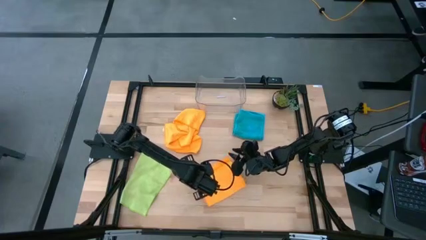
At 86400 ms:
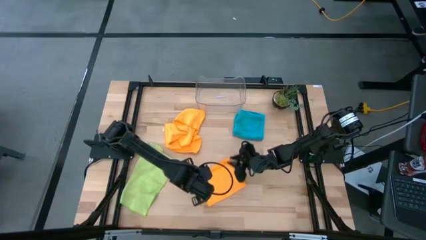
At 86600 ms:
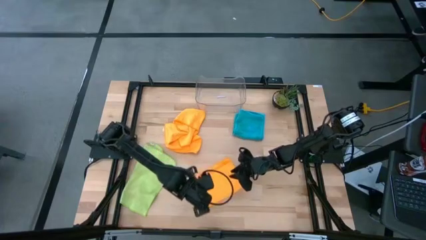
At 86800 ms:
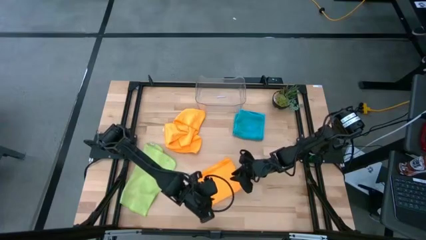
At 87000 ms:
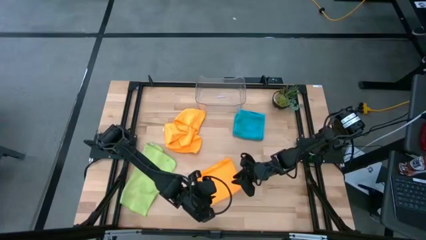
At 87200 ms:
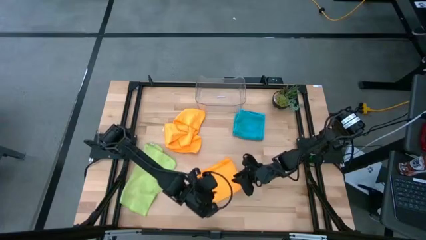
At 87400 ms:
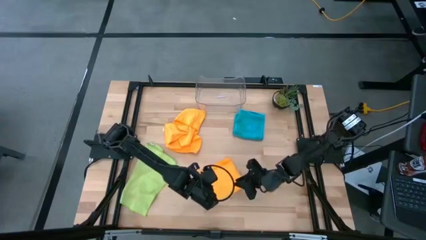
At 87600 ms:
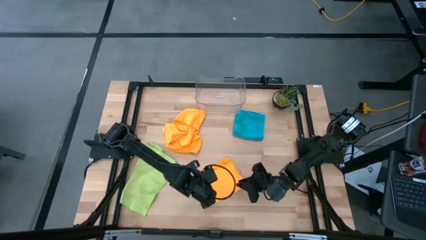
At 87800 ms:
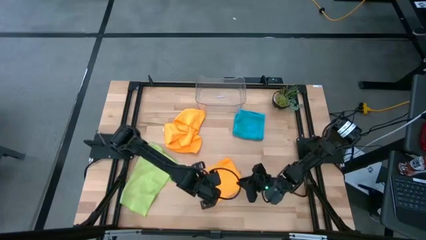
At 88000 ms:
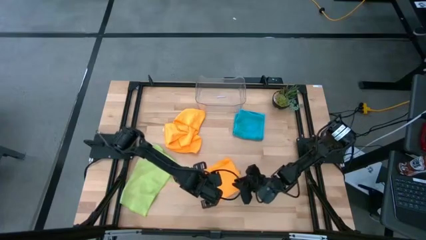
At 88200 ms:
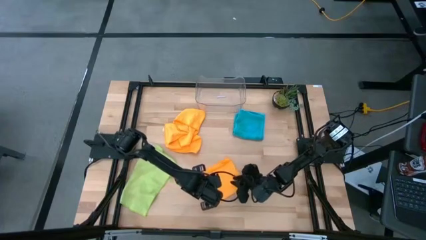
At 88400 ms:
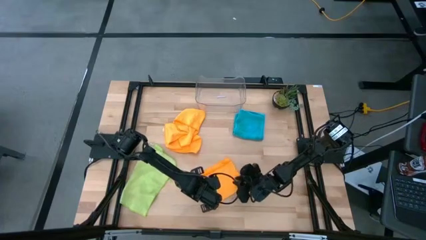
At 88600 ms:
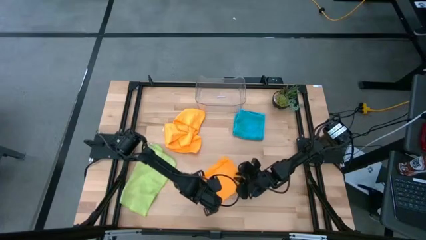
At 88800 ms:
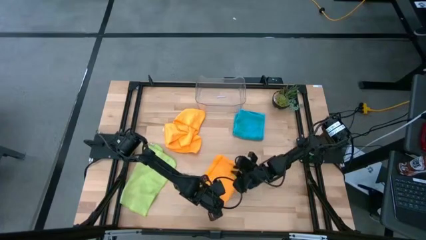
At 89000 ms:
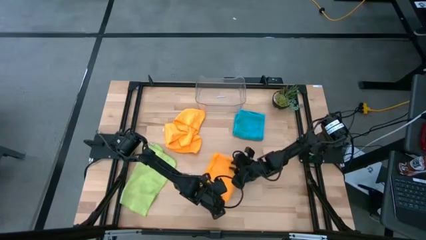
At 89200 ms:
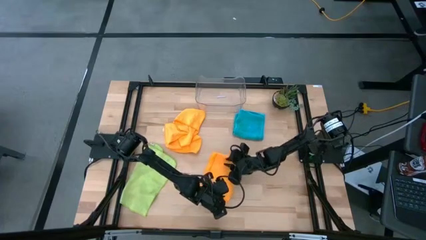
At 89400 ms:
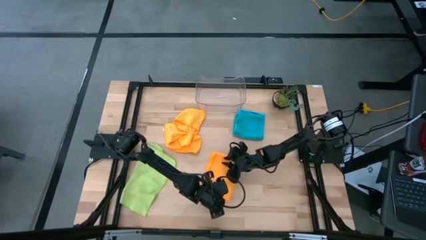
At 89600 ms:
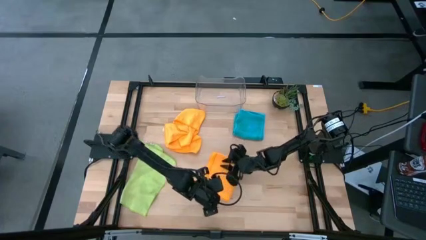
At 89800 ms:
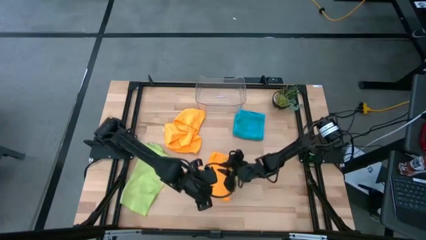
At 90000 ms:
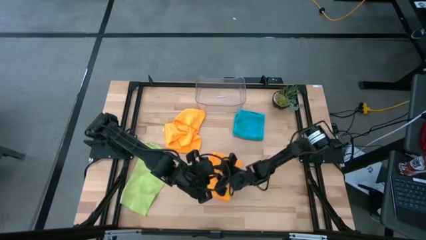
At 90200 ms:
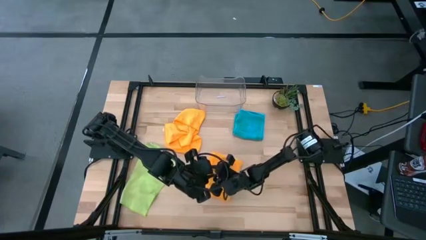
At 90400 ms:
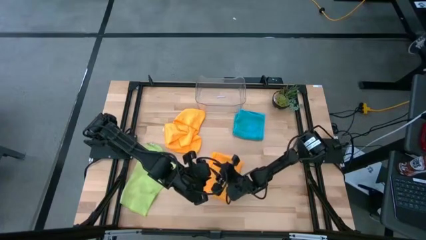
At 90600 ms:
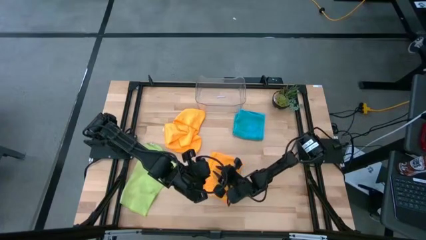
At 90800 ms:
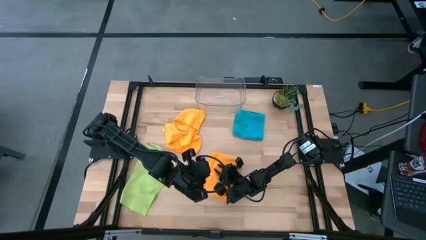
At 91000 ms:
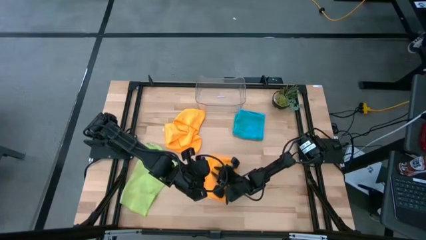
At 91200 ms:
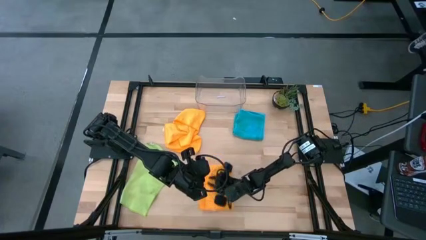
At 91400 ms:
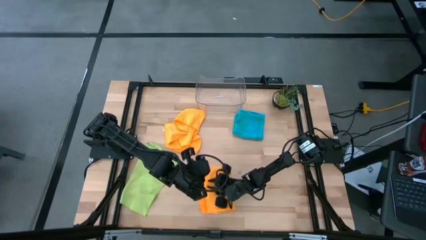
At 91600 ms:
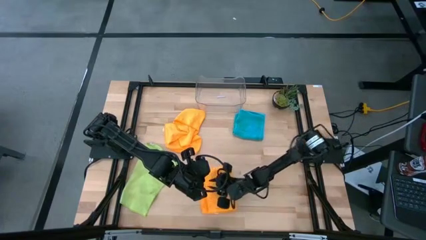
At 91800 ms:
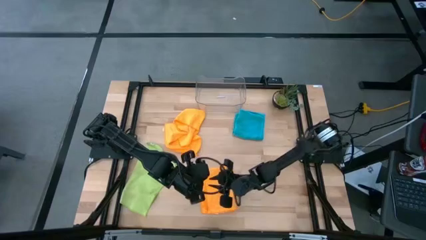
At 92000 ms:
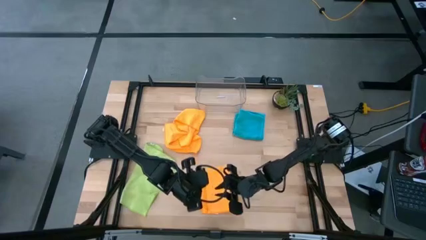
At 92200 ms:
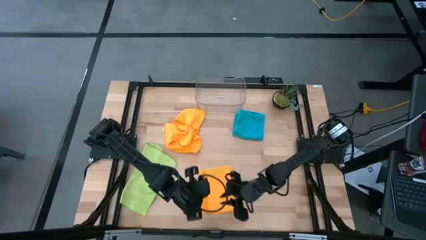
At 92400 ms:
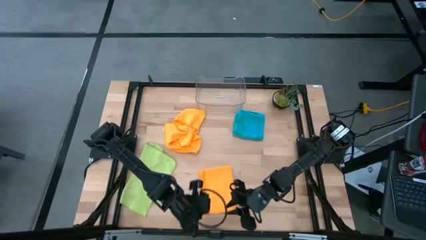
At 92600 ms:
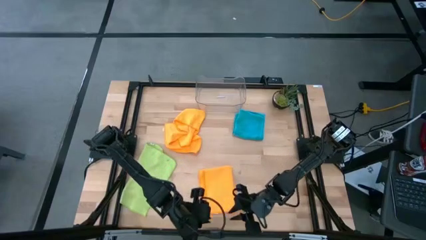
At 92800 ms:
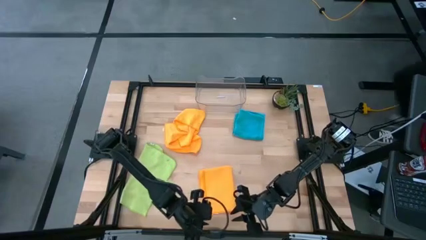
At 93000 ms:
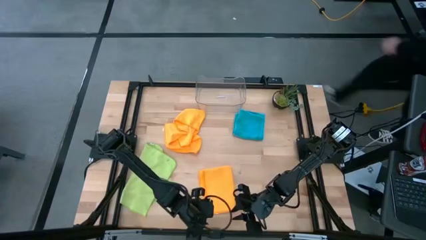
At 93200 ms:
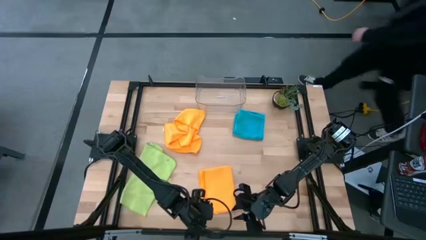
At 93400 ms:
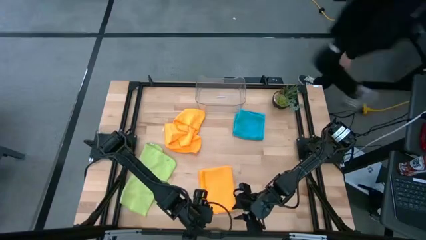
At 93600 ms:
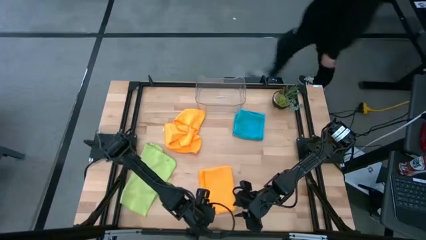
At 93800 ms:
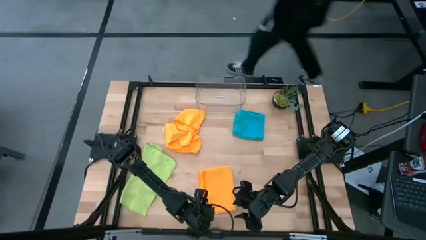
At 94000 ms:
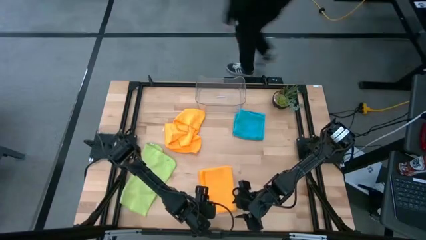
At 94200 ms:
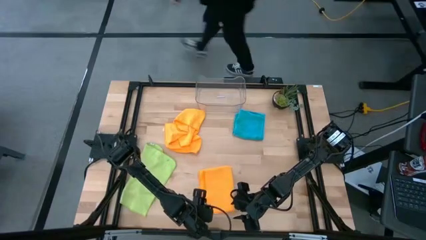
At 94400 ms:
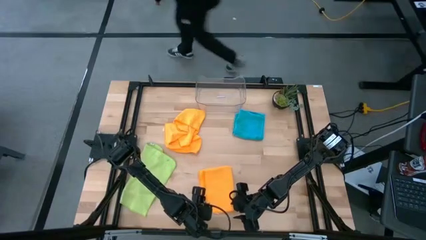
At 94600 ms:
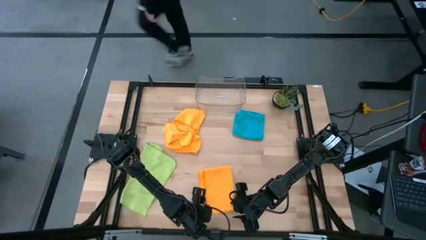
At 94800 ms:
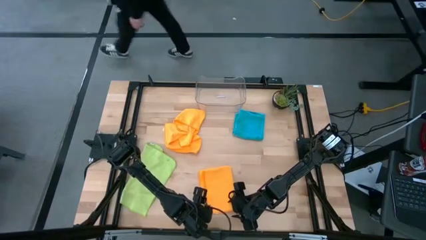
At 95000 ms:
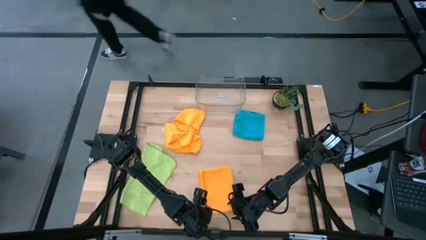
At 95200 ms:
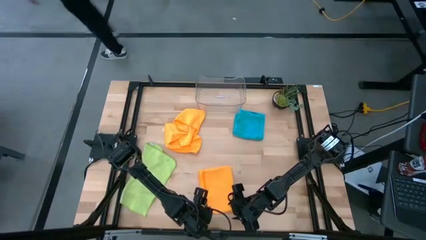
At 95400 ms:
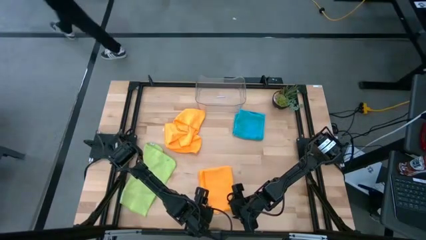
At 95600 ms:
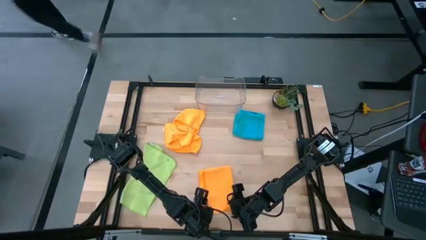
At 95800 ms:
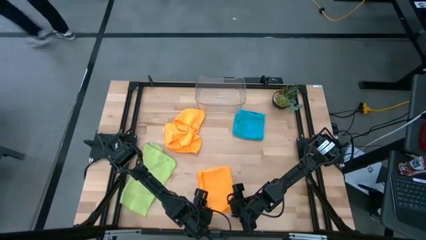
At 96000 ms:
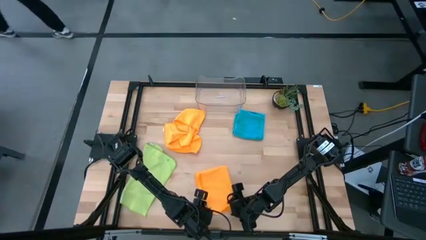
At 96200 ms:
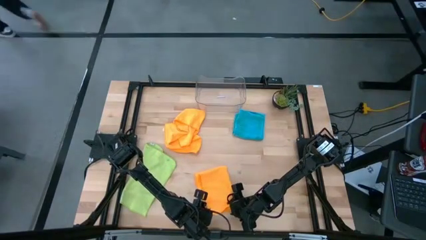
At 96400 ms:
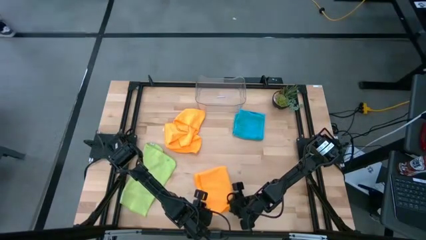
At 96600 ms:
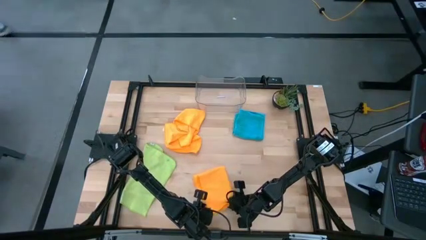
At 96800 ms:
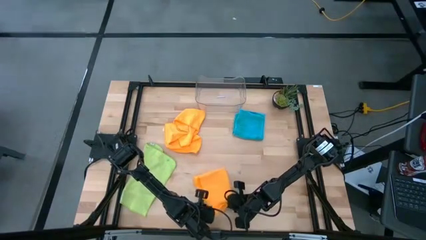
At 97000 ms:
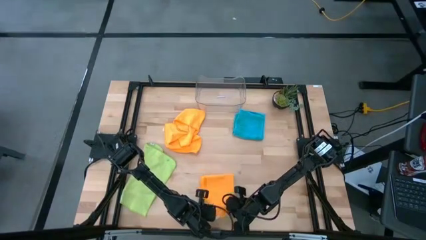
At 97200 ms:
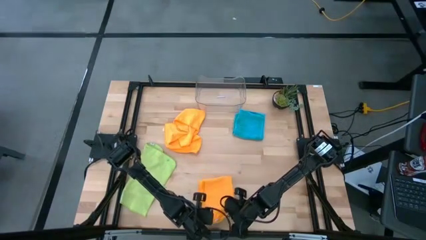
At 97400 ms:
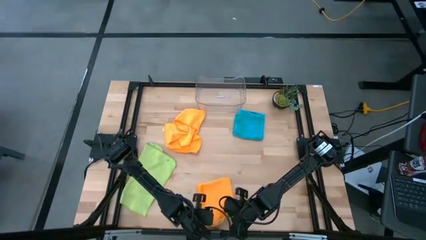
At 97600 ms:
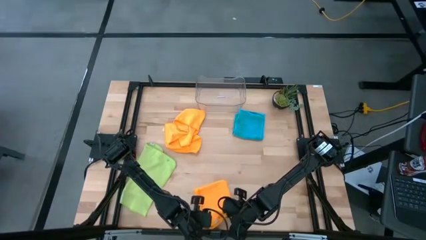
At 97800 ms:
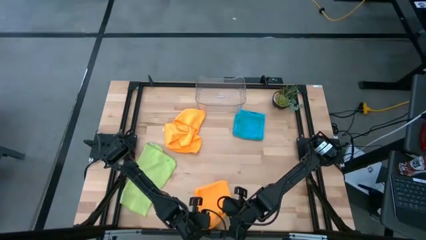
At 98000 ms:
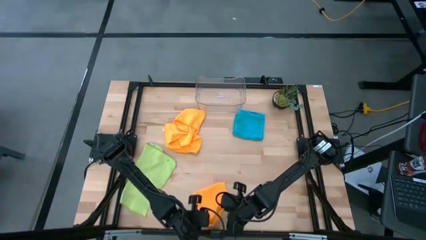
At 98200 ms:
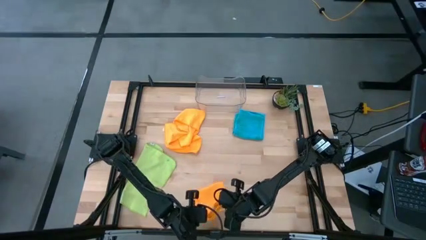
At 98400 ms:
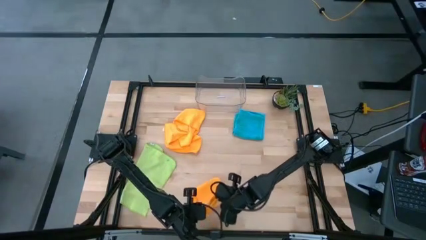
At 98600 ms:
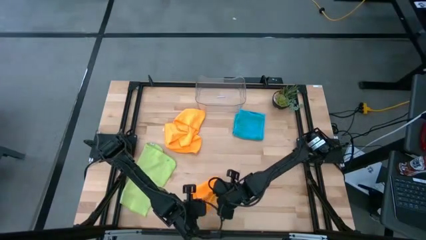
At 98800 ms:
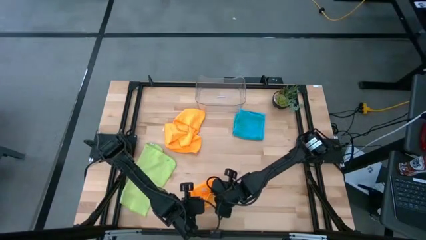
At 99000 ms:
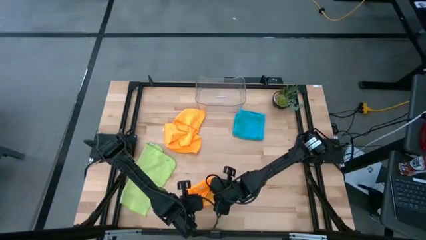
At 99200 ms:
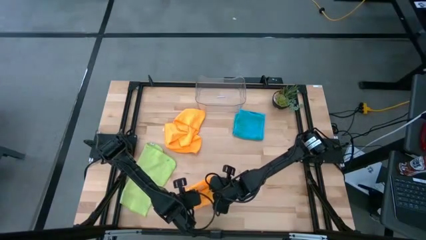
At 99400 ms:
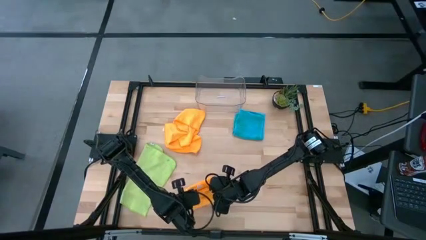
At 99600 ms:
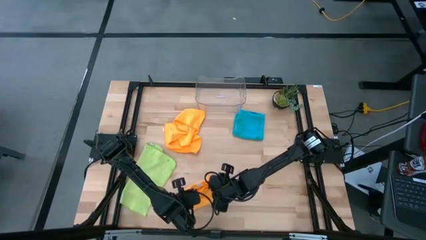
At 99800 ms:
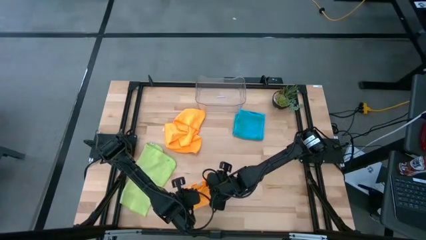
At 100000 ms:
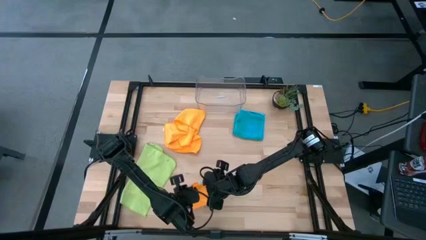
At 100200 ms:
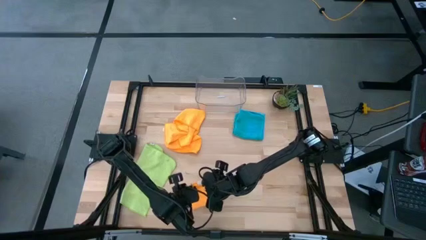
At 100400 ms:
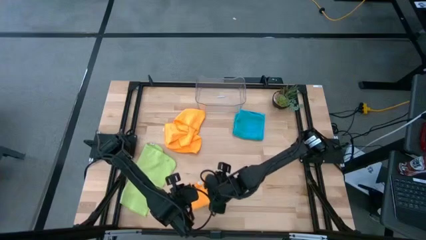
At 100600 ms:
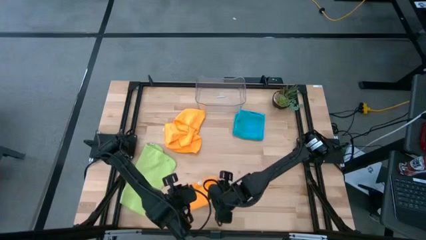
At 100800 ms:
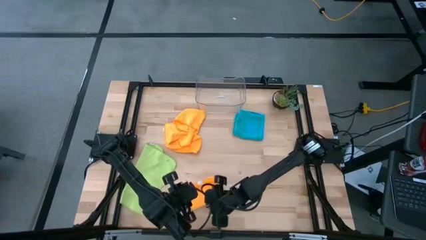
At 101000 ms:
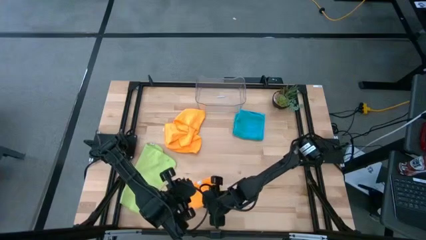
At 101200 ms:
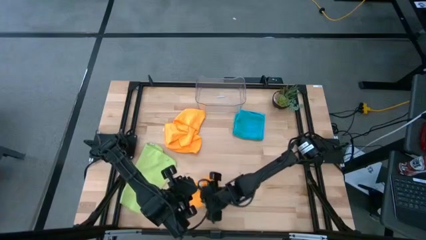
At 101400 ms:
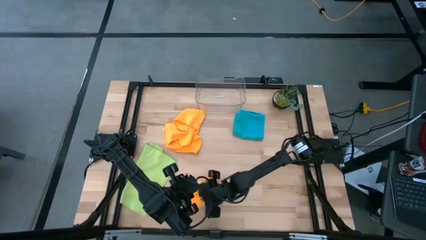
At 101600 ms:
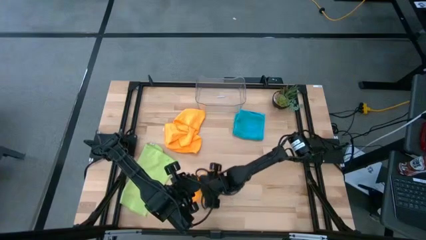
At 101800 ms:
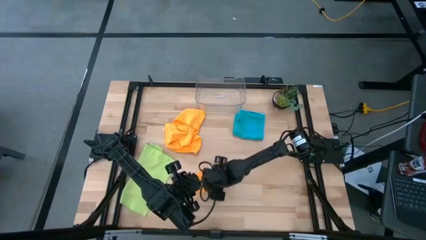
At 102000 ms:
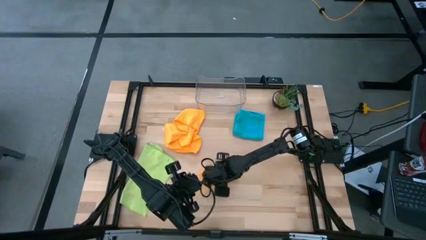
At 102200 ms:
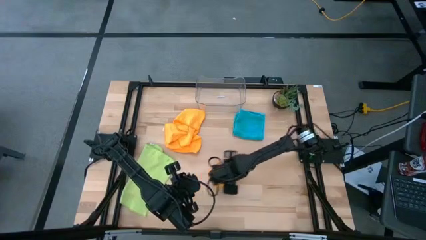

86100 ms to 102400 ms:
Task: Fold microfiber towels
Fold the bottom orange microfiber cloth
